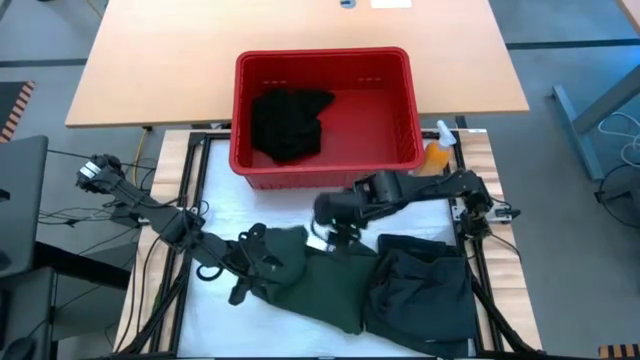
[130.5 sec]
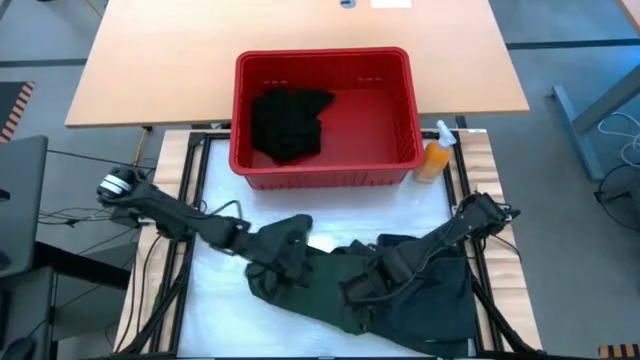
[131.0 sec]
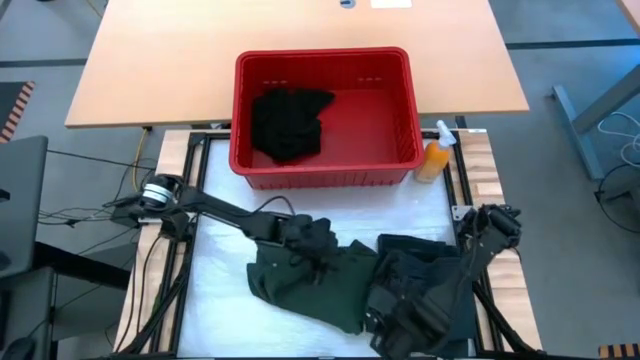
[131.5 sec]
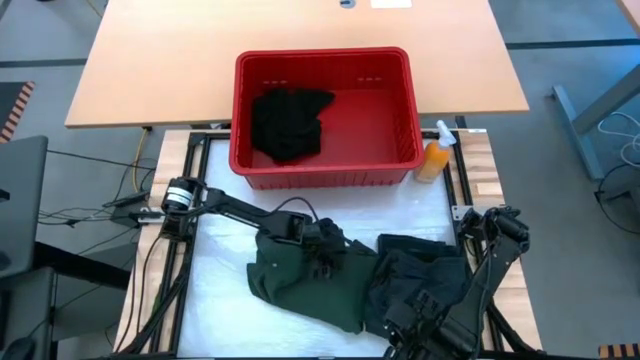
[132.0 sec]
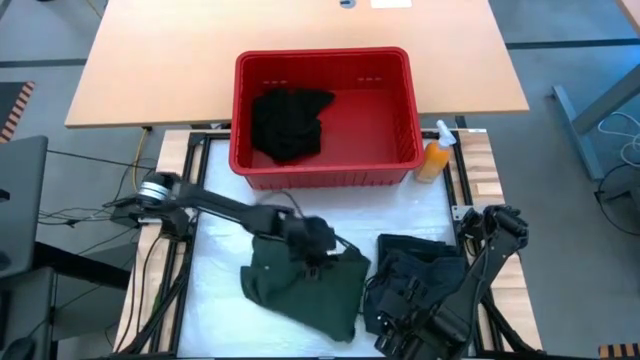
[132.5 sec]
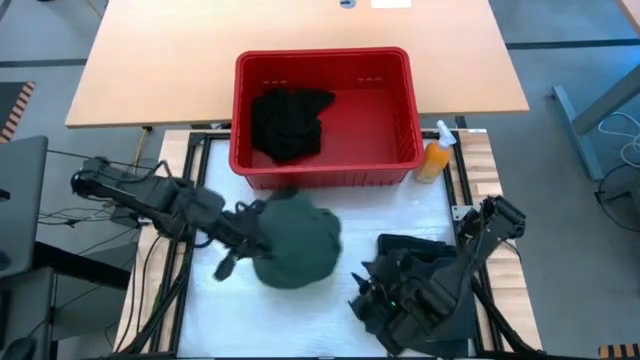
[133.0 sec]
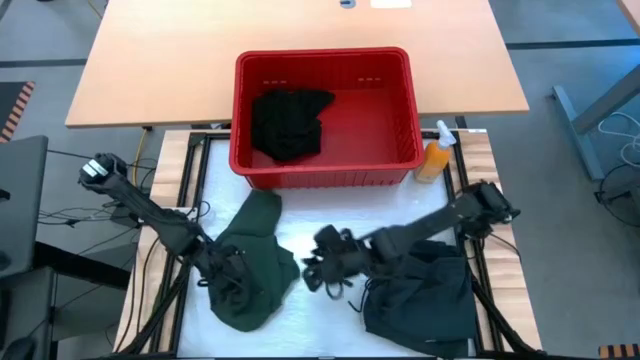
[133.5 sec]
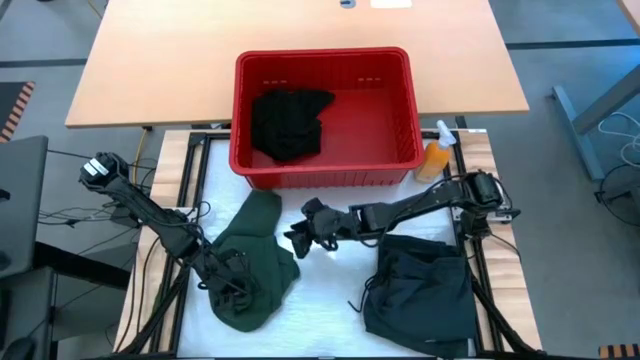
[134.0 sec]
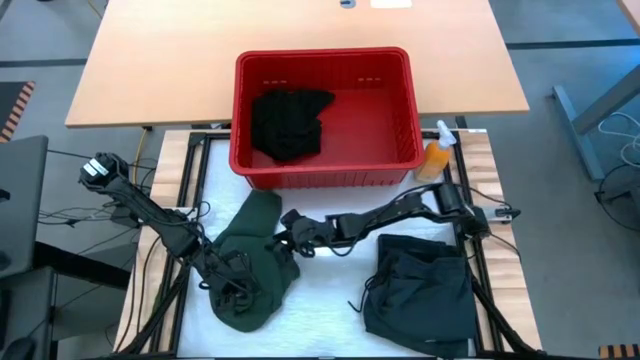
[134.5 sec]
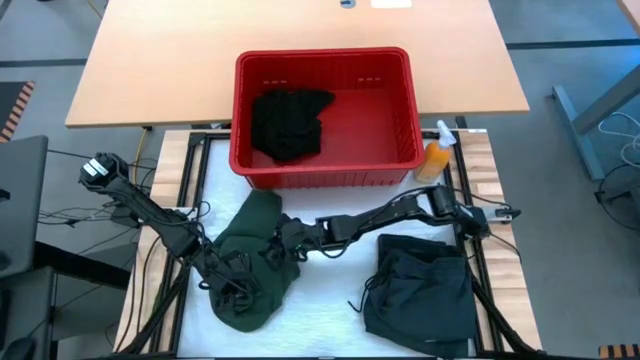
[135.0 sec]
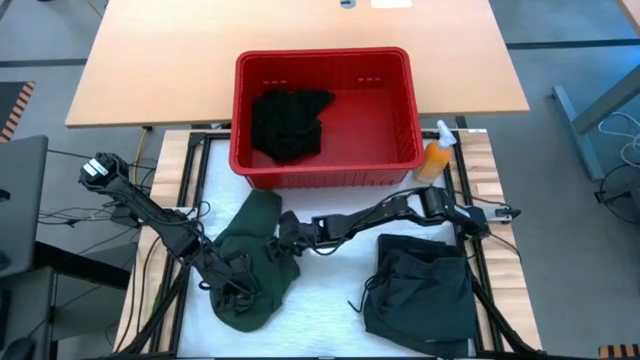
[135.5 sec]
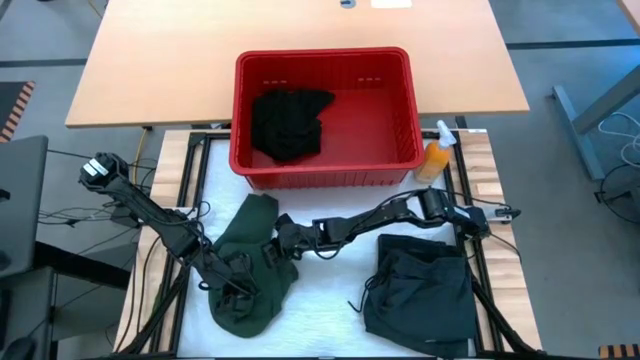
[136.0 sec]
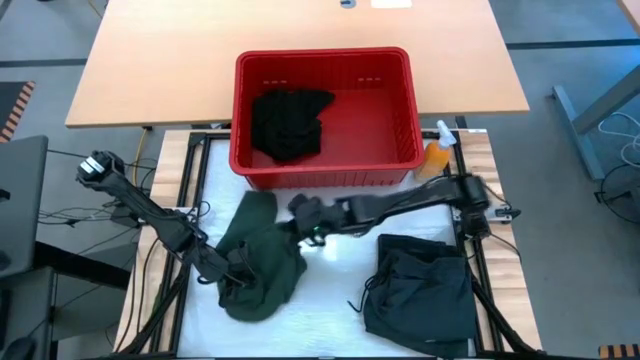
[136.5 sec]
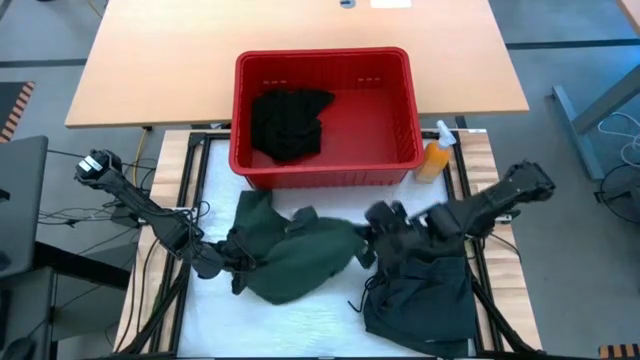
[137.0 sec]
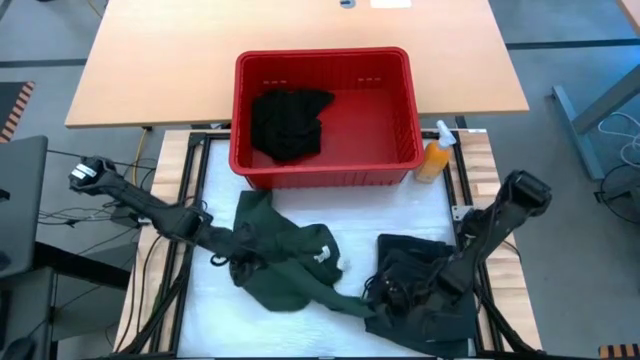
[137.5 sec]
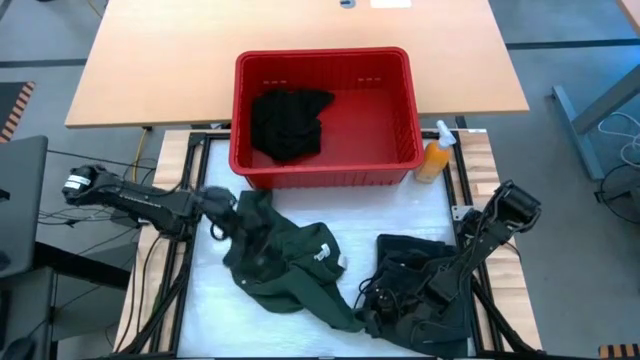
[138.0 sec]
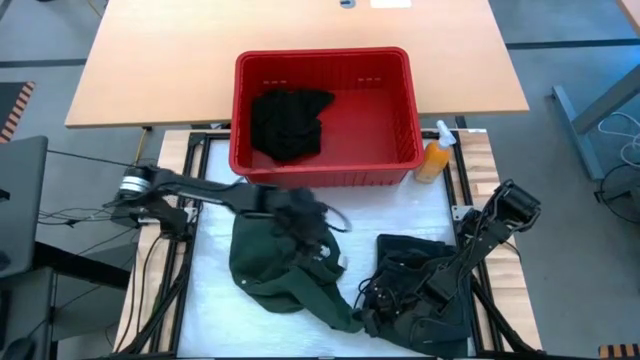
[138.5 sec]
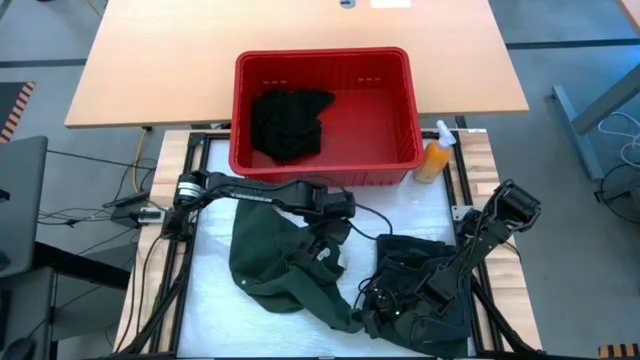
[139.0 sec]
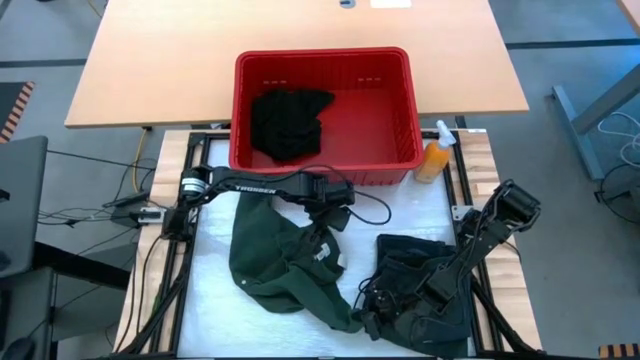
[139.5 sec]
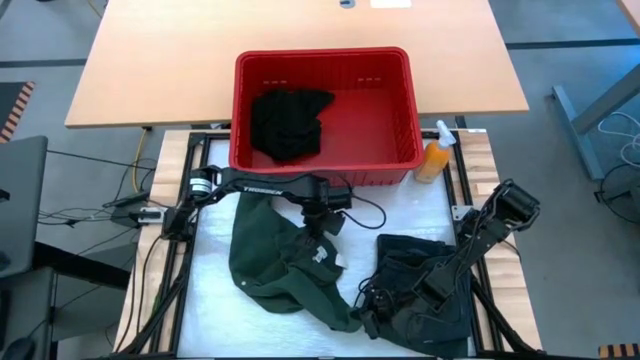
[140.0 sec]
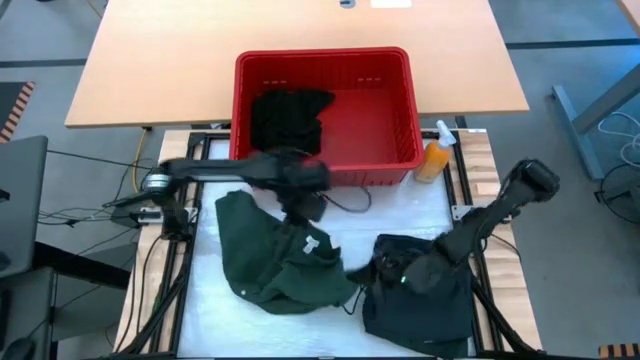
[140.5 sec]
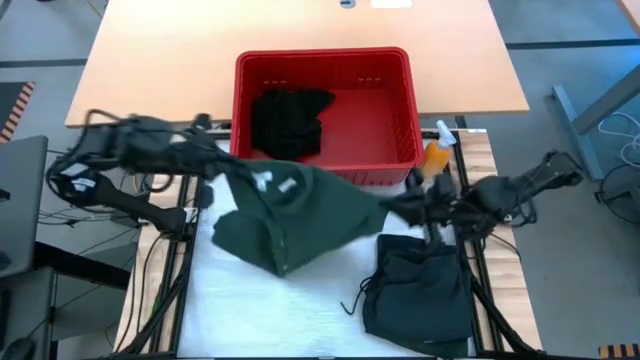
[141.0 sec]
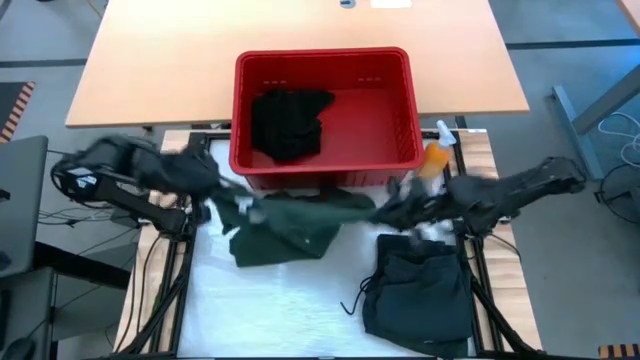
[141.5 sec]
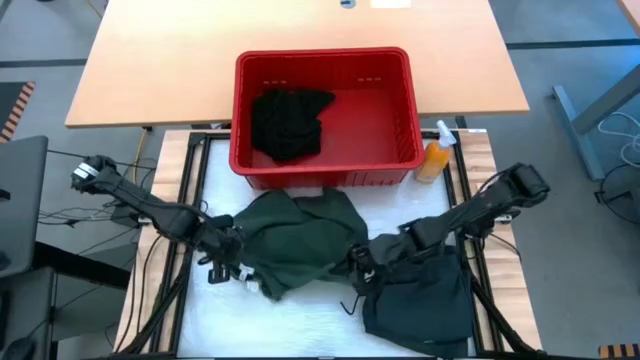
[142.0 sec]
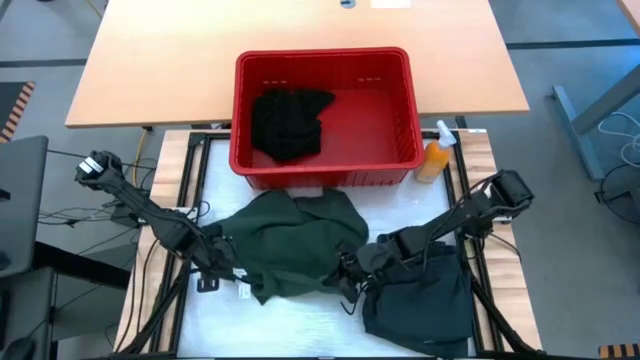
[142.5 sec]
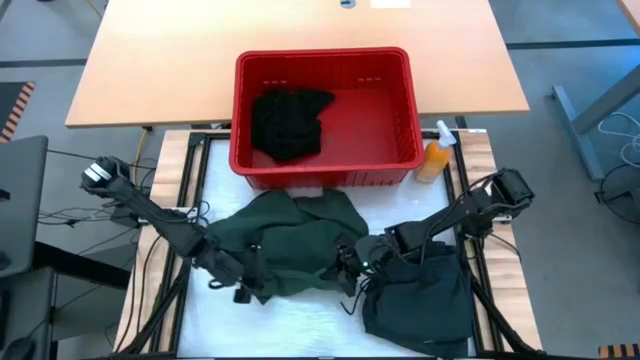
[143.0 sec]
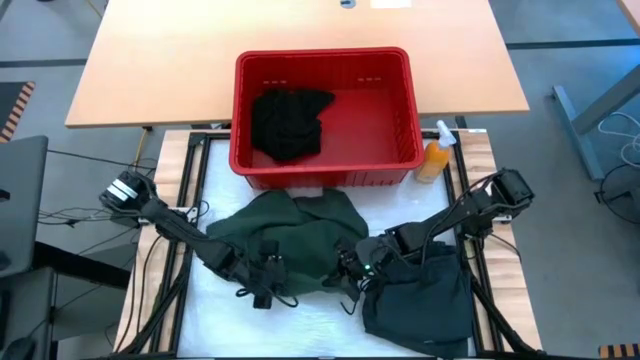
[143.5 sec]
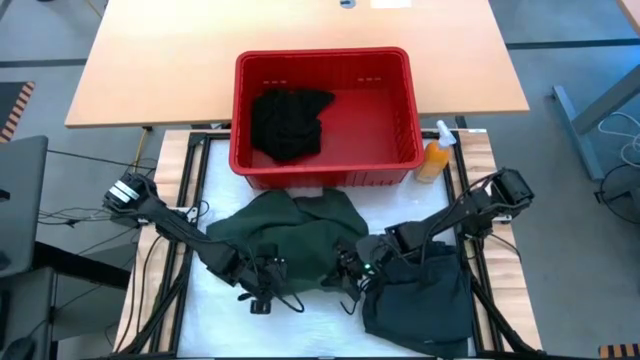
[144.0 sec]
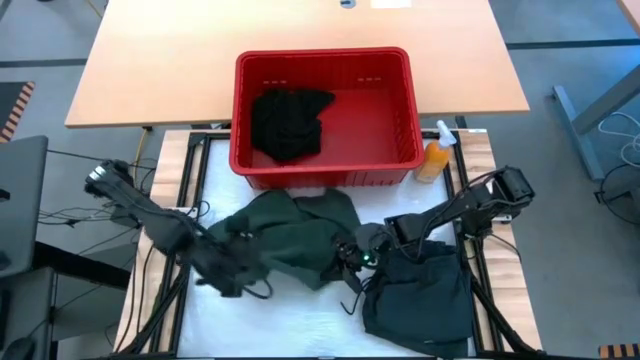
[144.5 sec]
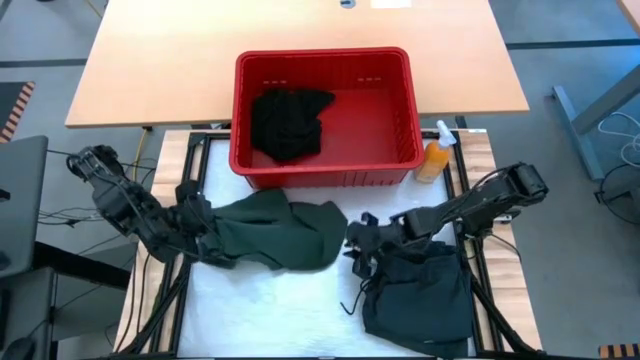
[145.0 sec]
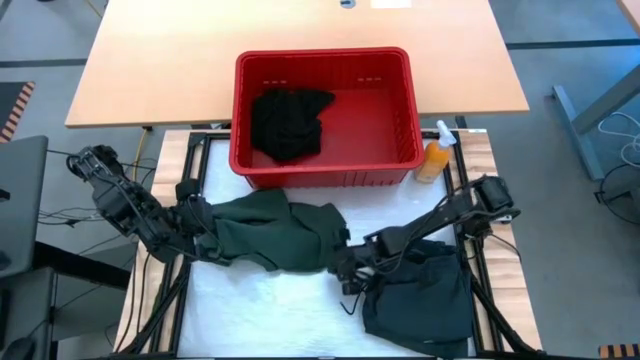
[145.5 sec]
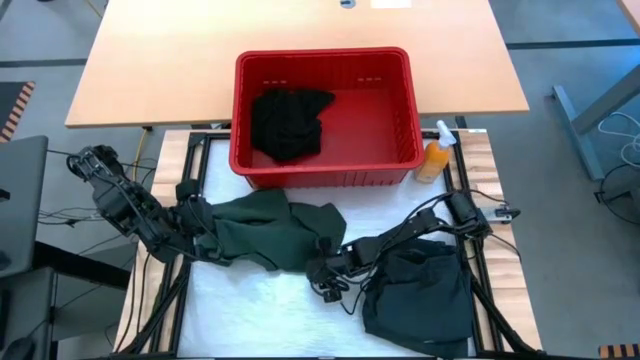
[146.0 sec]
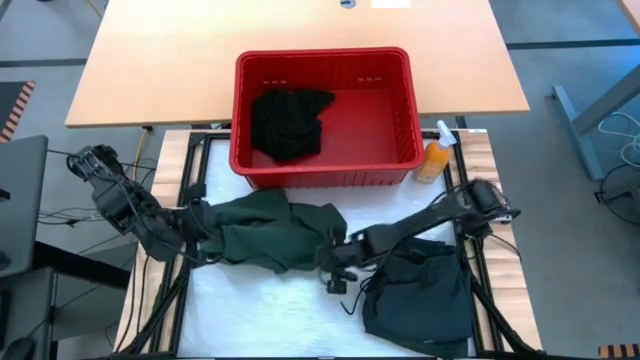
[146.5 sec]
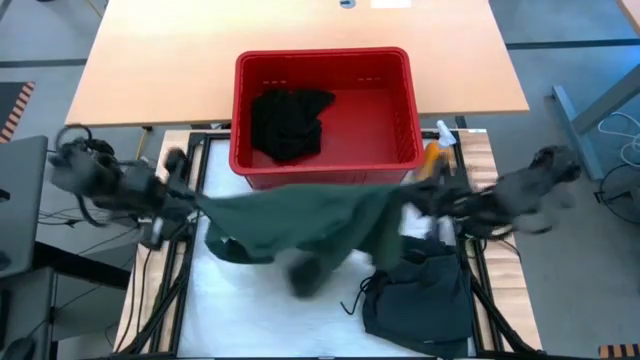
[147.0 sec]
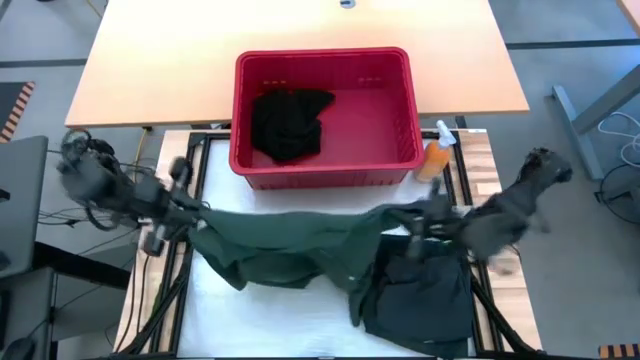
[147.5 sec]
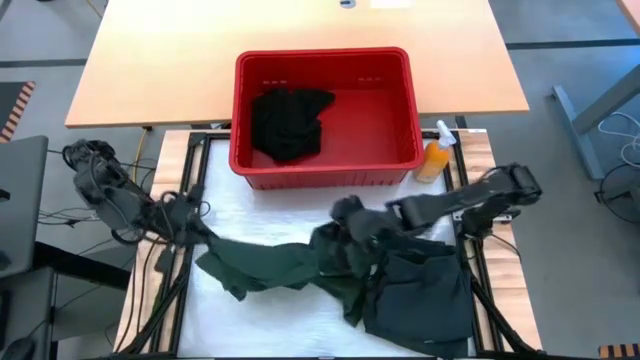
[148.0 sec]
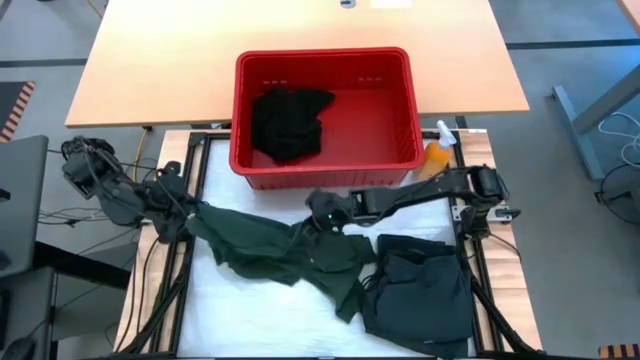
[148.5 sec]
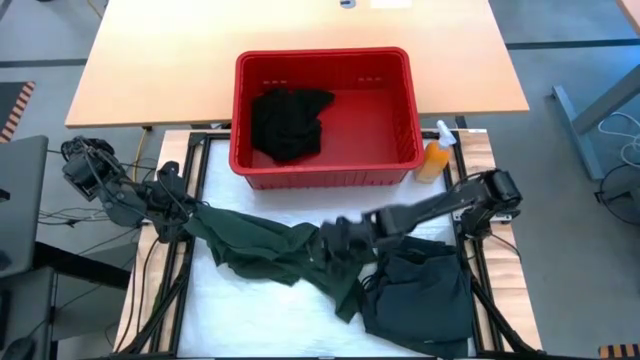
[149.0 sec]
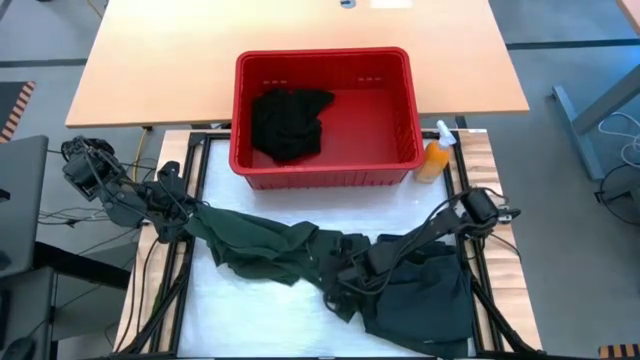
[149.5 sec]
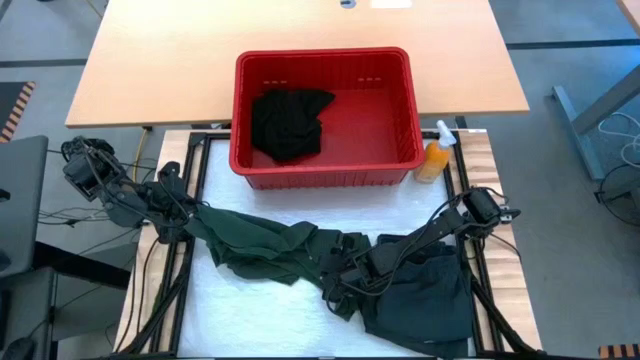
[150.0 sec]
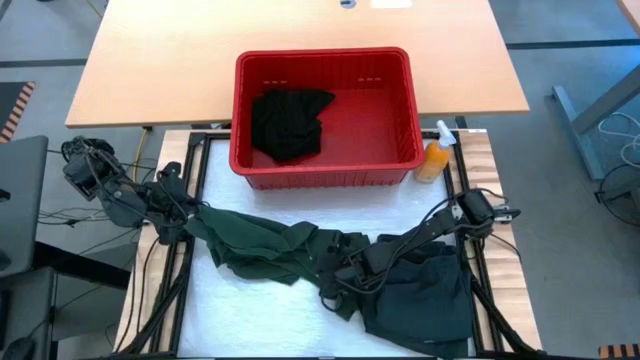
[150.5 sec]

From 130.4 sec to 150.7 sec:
Task: Fold laundry
Fold the green shirt

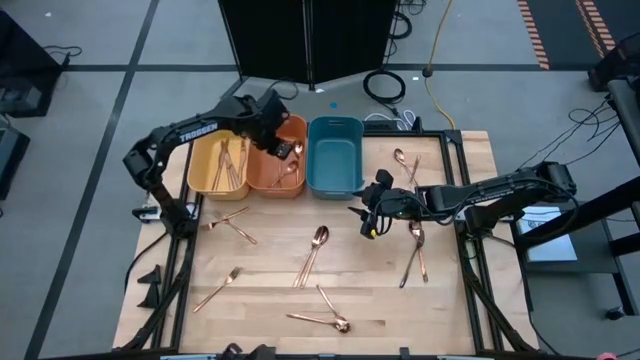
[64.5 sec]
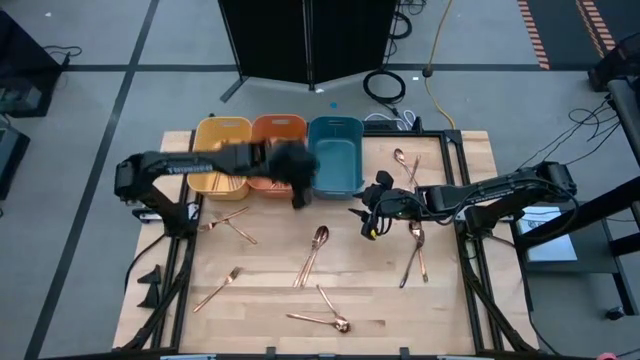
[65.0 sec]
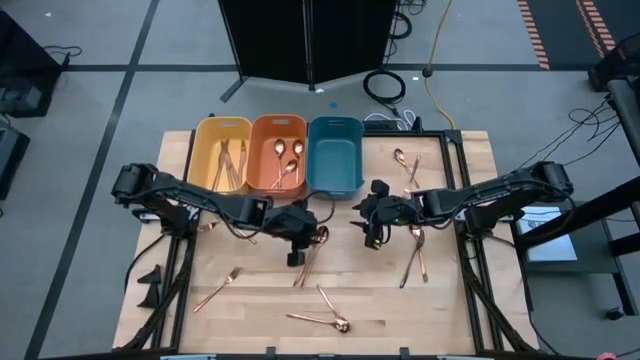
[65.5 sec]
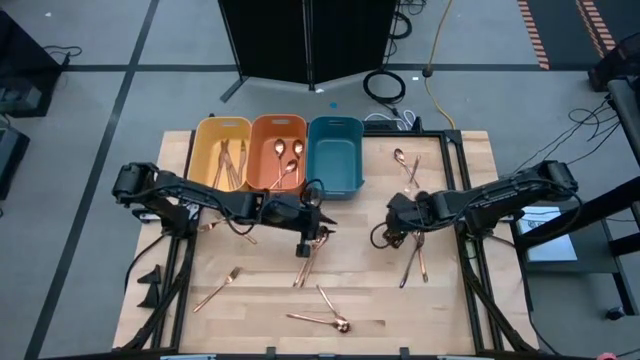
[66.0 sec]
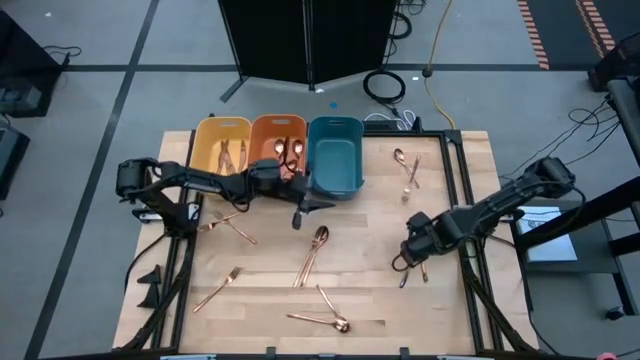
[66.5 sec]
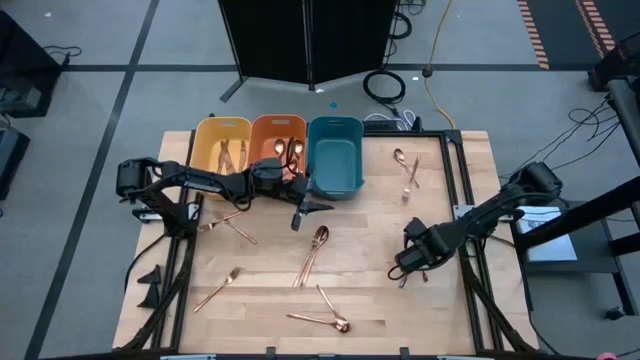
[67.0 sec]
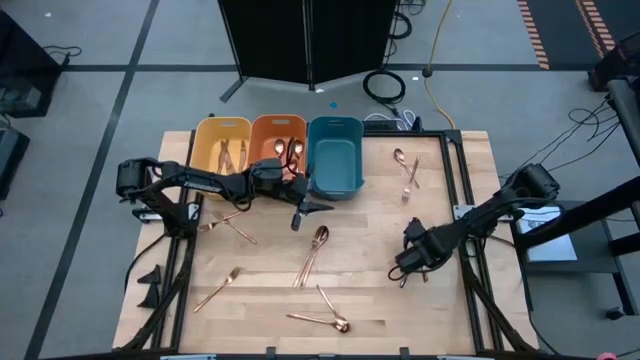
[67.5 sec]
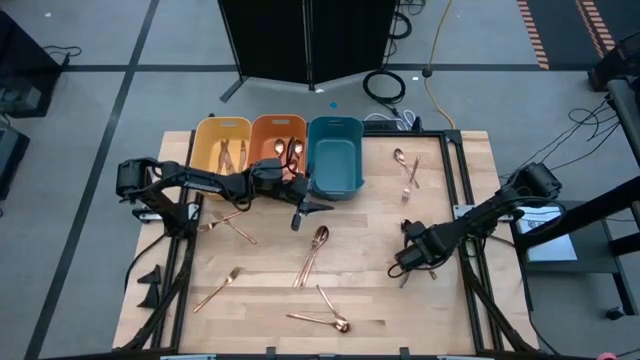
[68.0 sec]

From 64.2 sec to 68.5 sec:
Task: Sort silverware
Put the gold spoon into the orange bin
